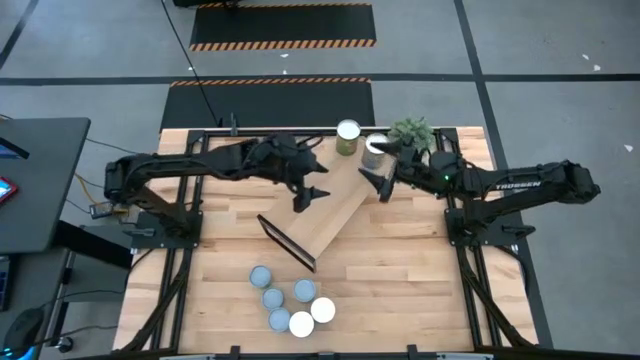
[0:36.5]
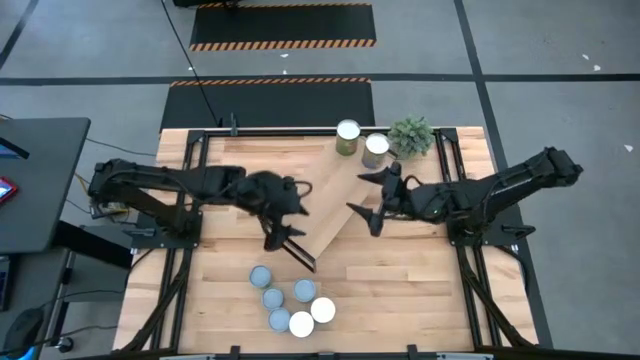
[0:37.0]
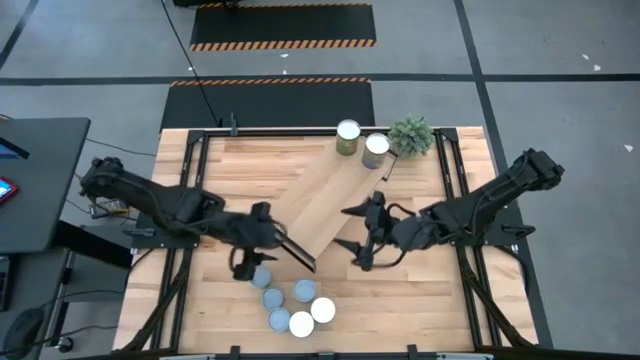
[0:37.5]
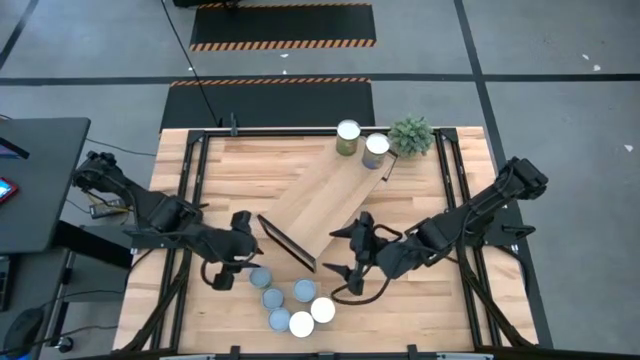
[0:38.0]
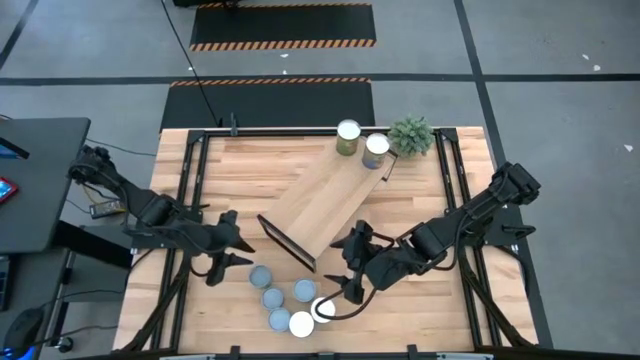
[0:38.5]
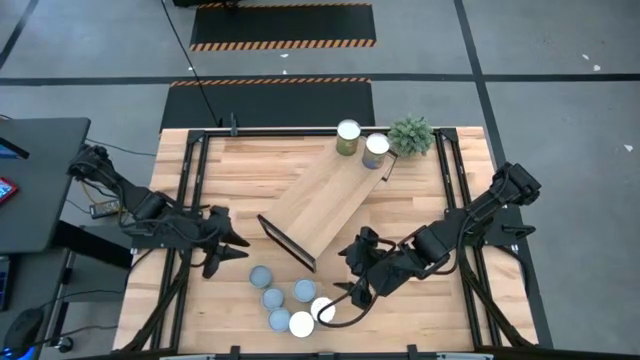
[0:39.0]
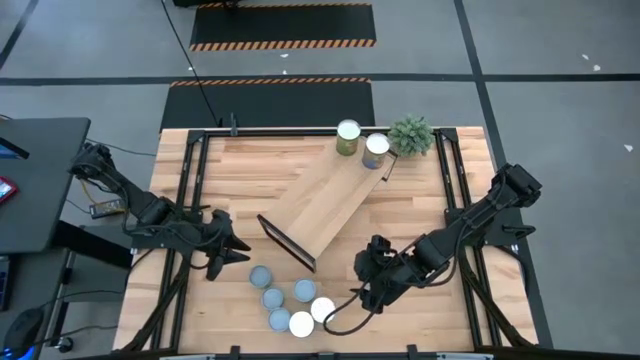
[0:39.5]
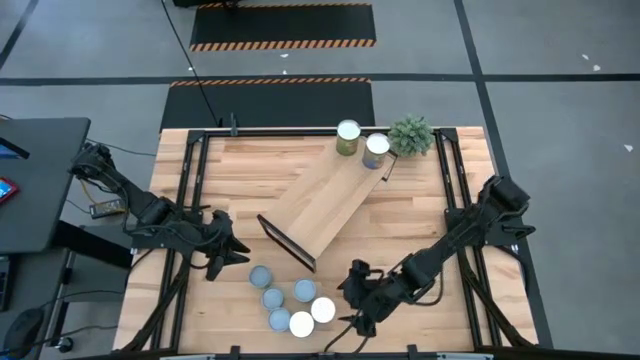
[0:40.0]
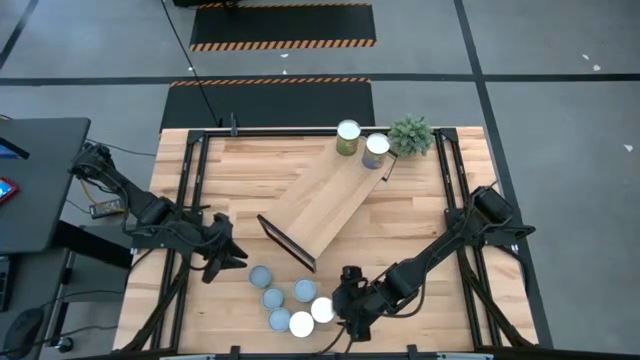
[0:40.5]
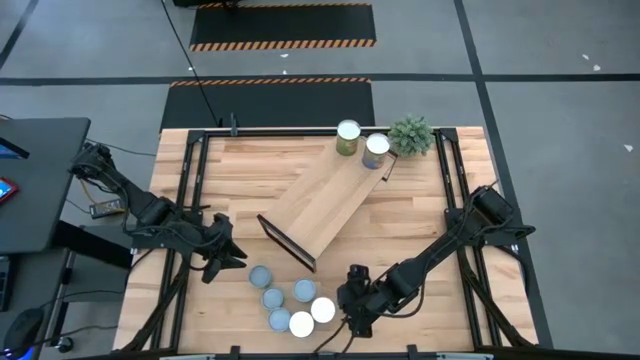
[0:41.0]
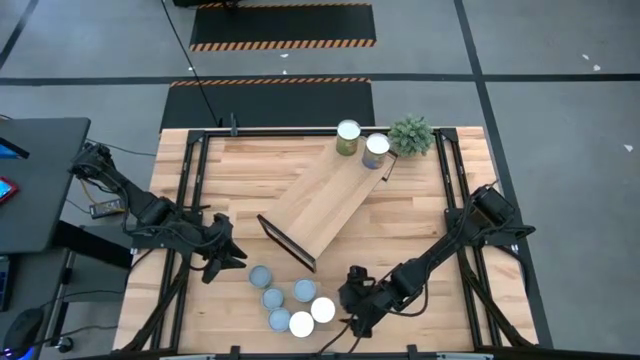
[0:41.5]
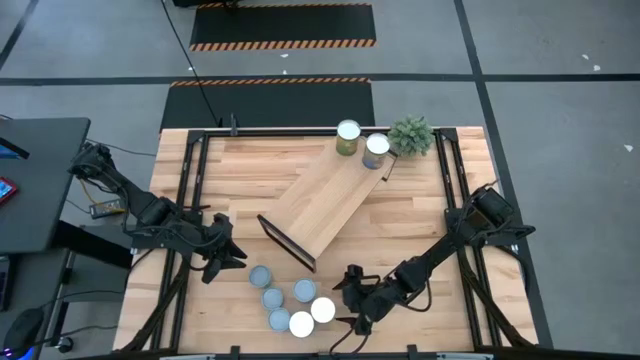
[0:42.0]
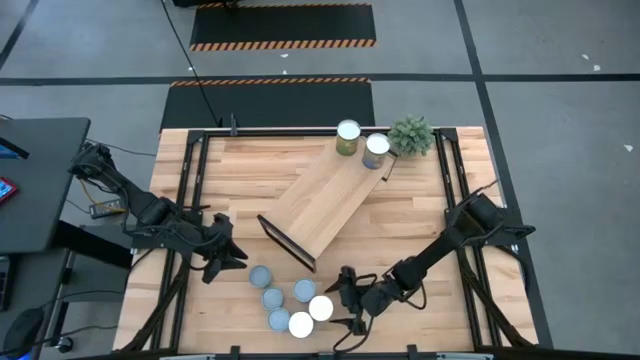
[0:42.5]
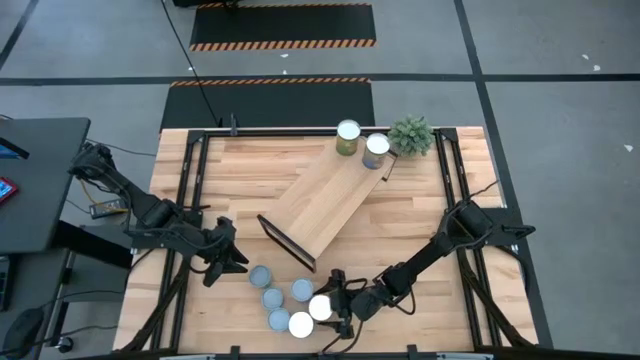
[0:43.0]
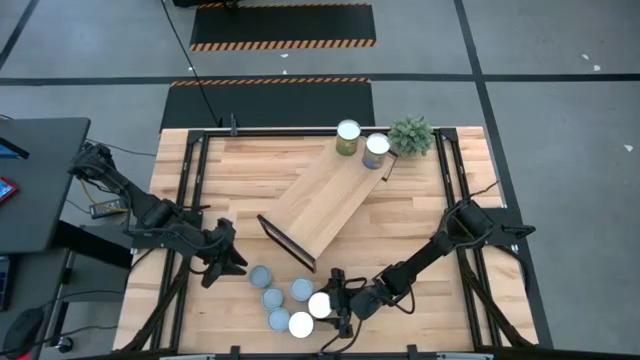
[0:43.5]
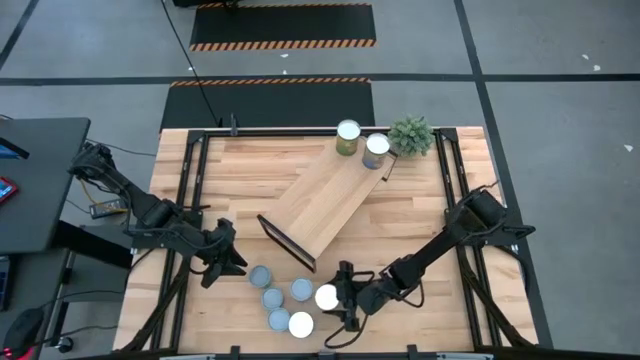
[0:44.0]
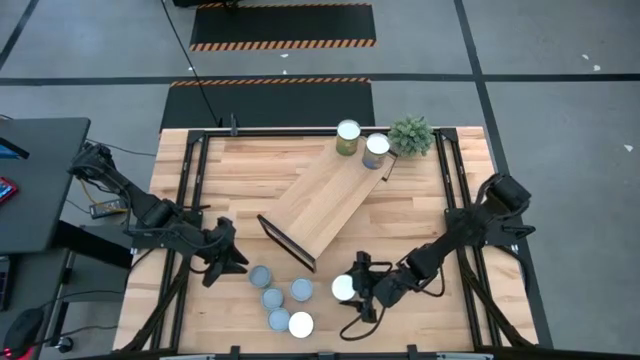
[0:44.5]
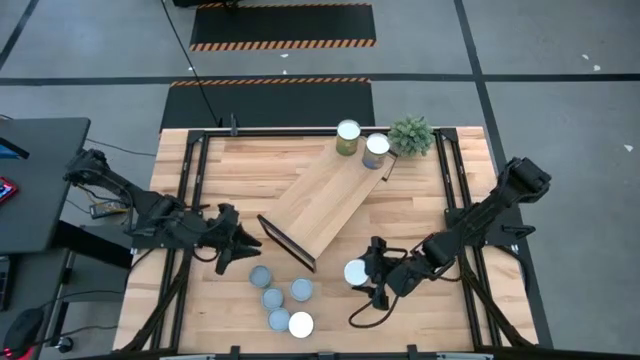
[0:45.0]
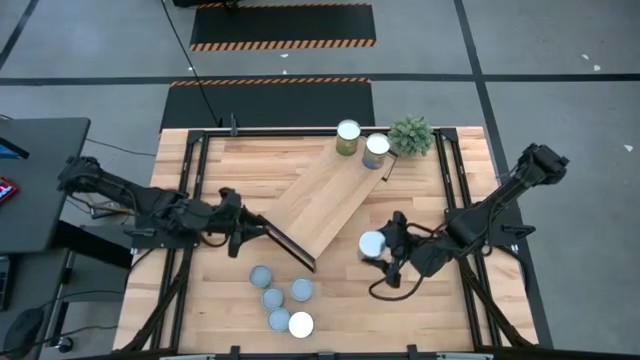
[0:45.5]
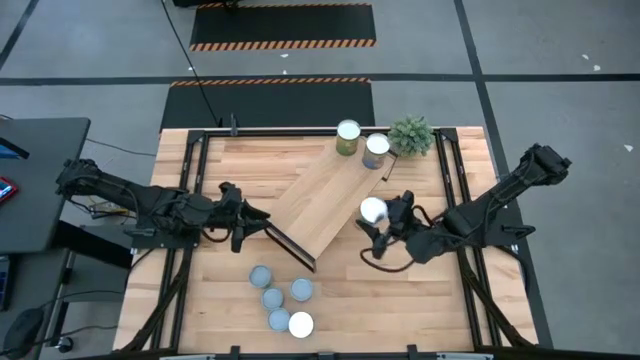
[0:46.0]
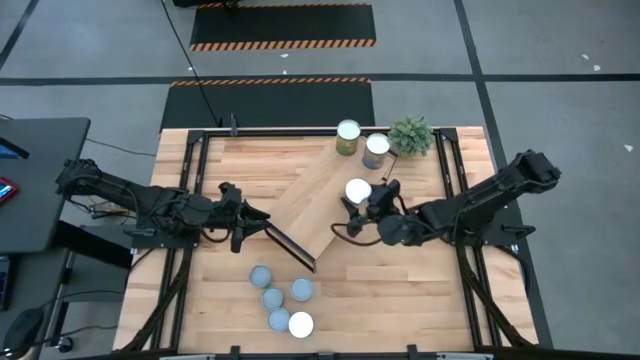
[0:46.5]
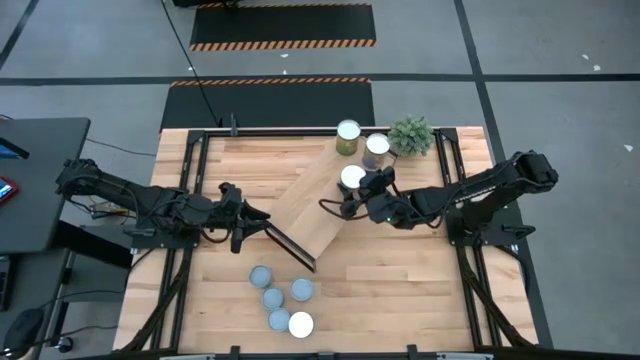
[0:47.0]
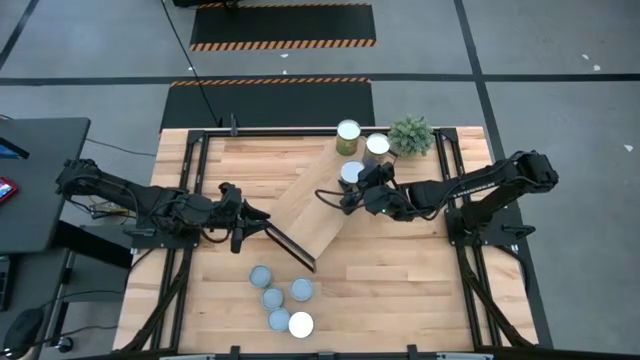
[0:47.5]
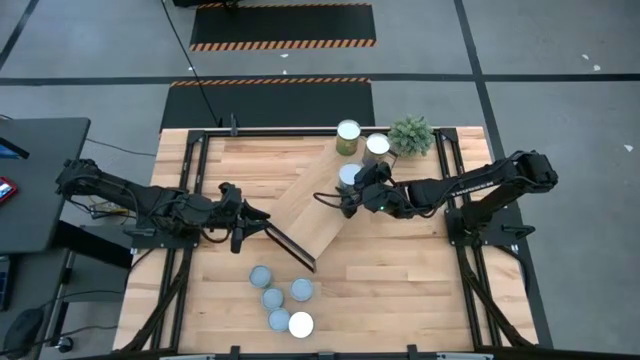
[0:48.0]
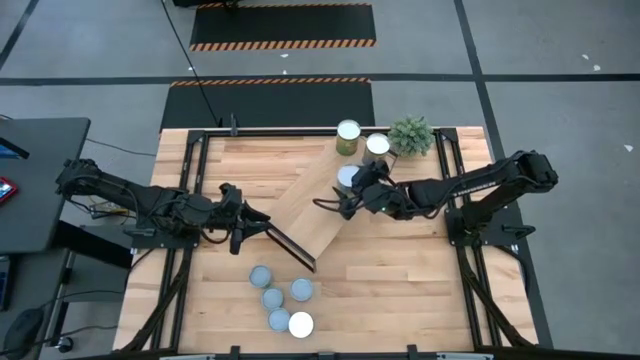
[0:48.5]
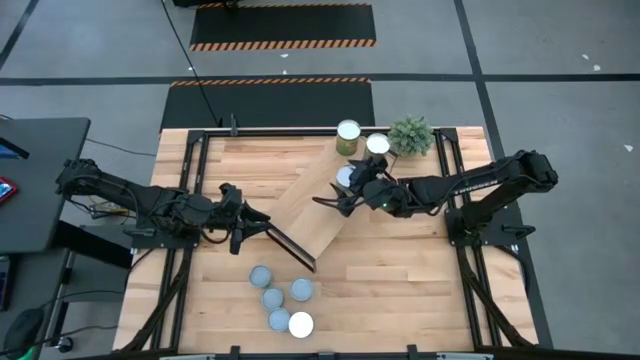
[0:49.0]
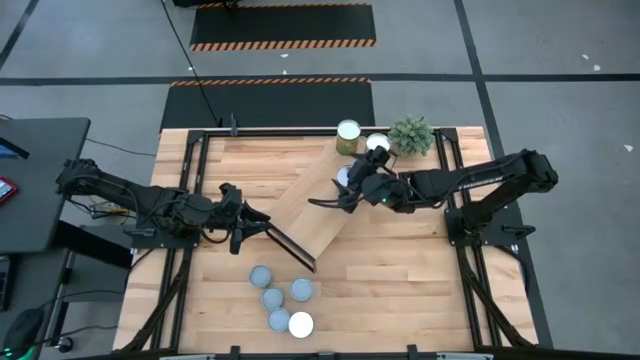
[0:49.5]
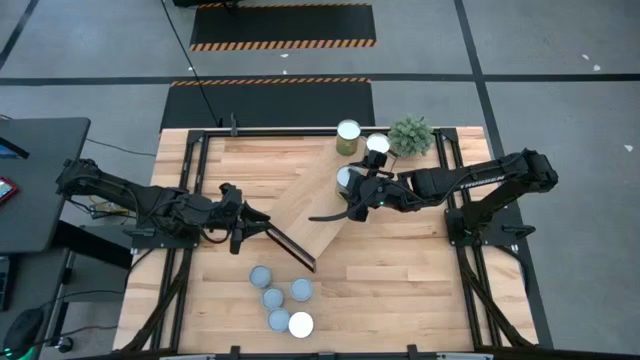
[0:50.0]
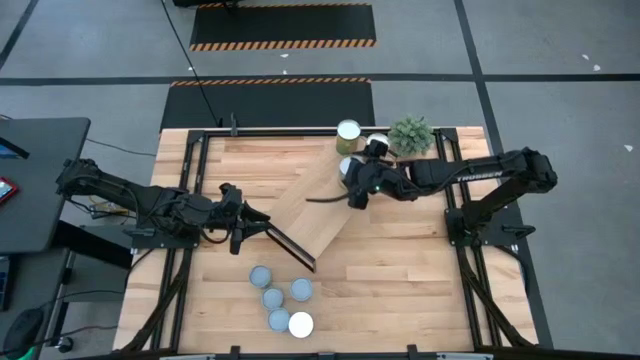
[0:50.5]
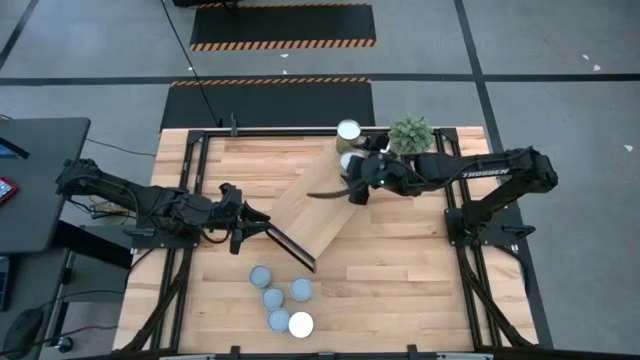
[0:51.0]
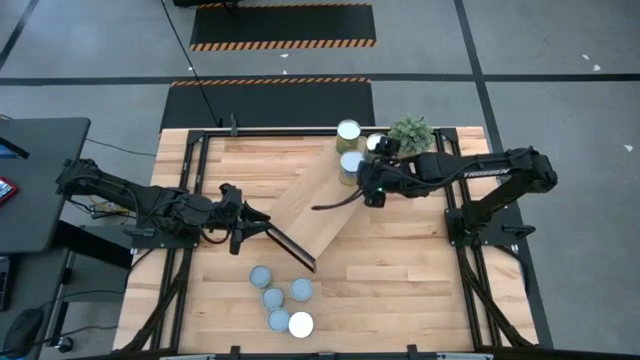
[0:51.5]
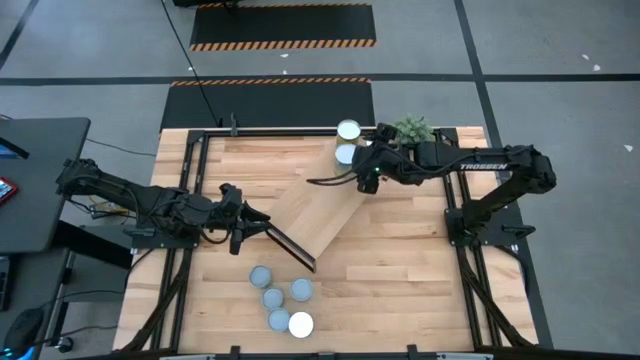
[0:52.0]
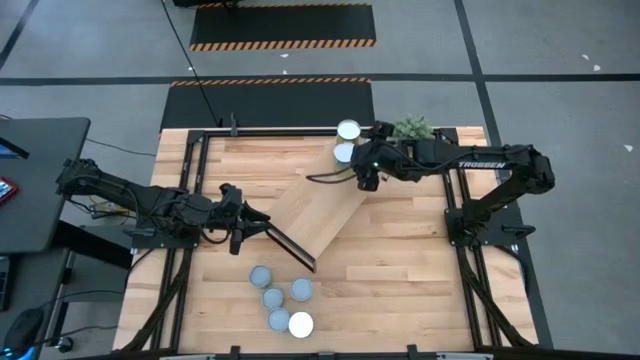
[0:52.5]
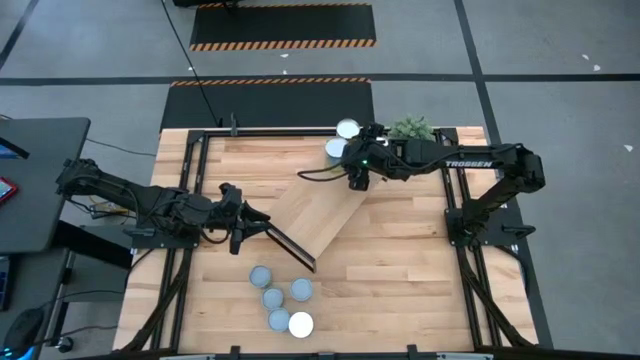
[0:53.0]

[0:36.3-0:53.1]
Task: Pick and place cans onto a shelf
Put the canned carrots on the shelf

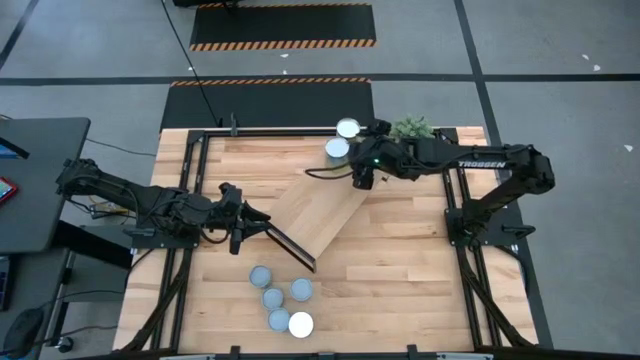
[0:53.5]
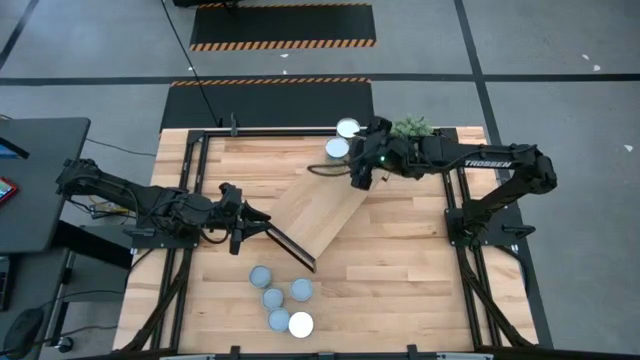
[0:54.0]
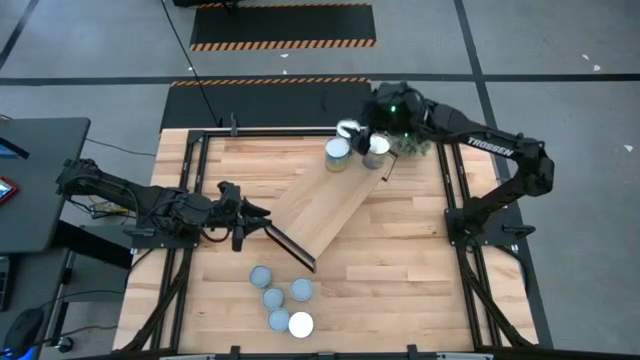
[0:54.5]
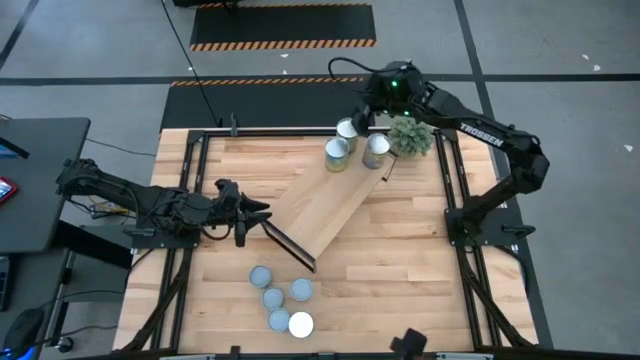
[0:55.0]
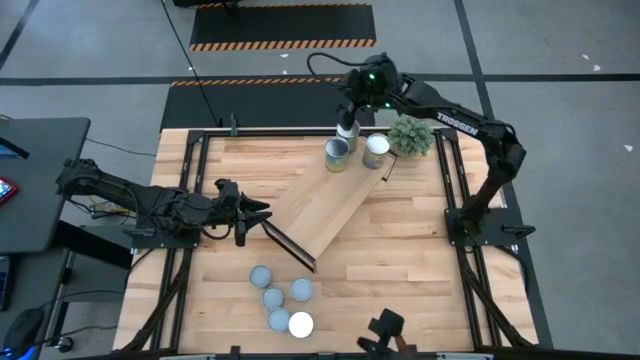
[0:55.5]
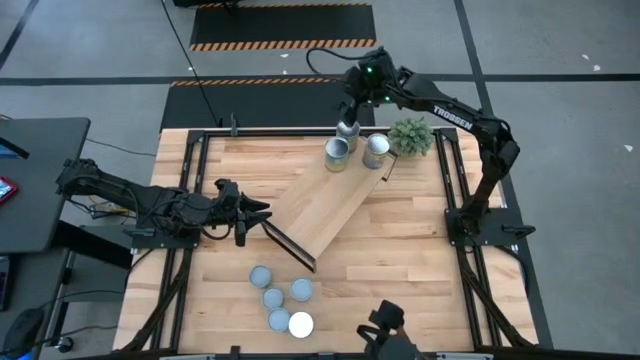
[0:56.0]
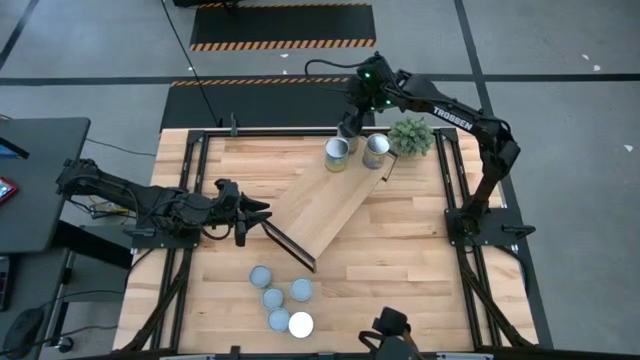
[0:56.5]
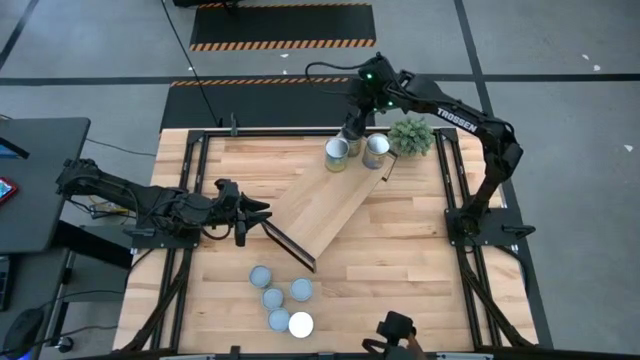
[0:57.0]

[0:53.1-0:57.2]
Adjust the canned oranges on the shelf
